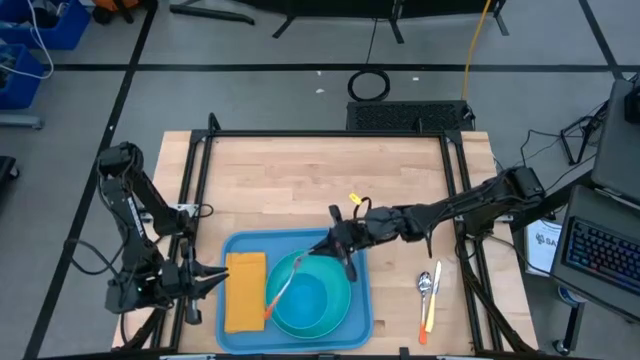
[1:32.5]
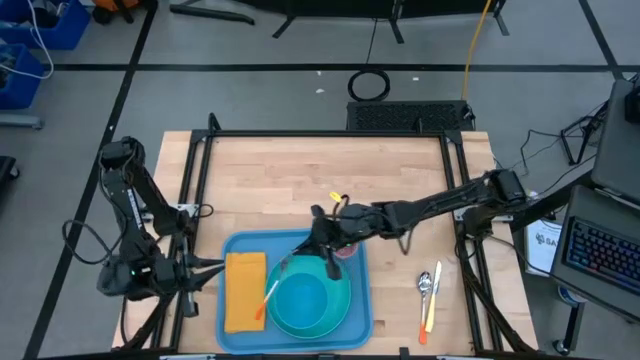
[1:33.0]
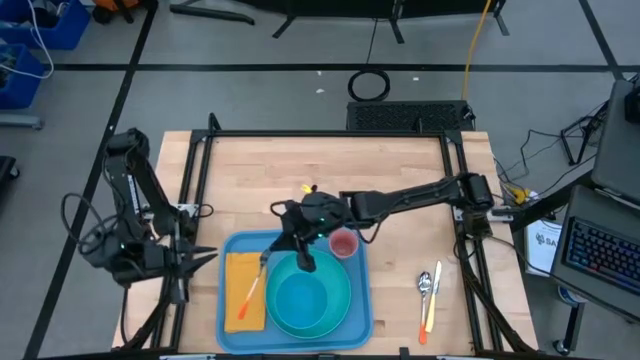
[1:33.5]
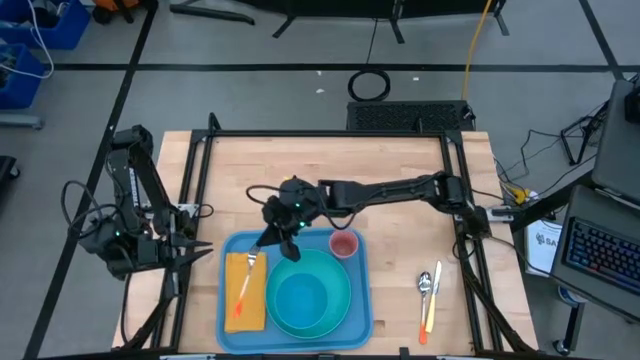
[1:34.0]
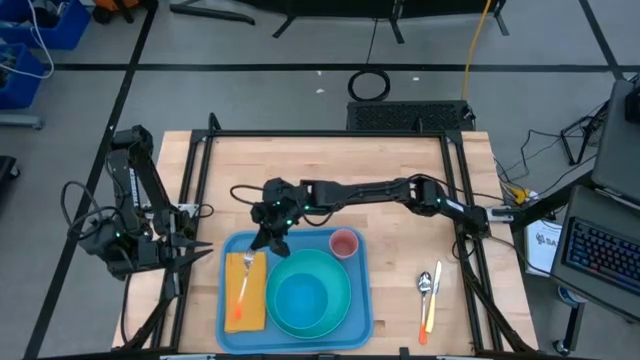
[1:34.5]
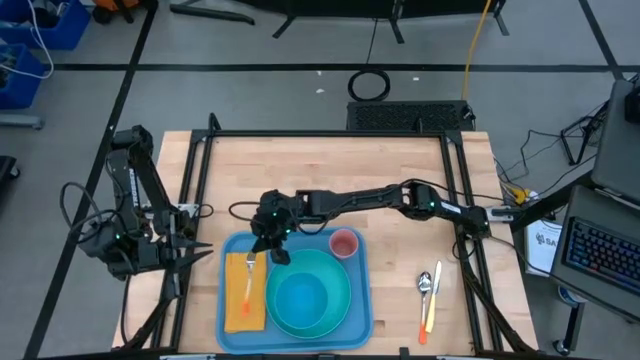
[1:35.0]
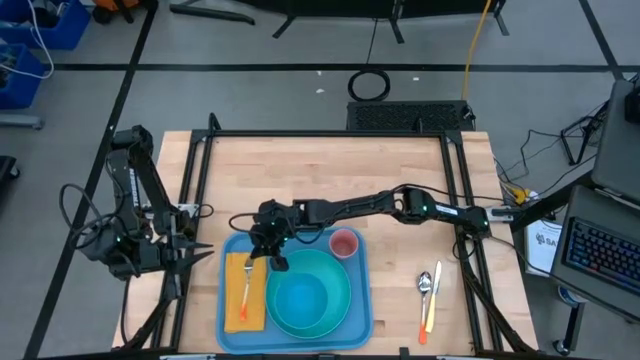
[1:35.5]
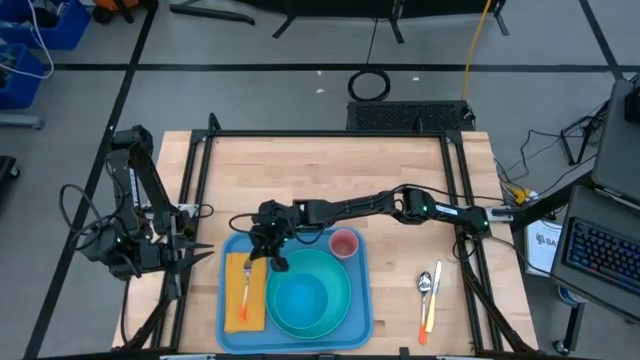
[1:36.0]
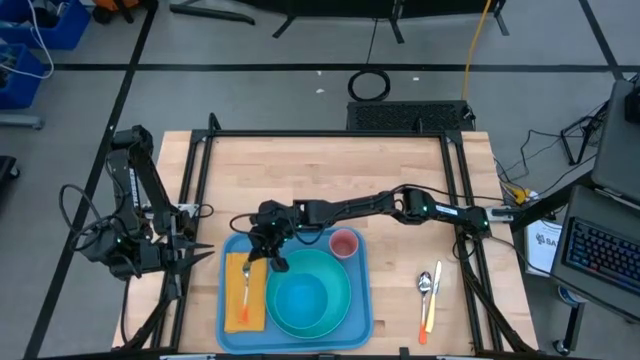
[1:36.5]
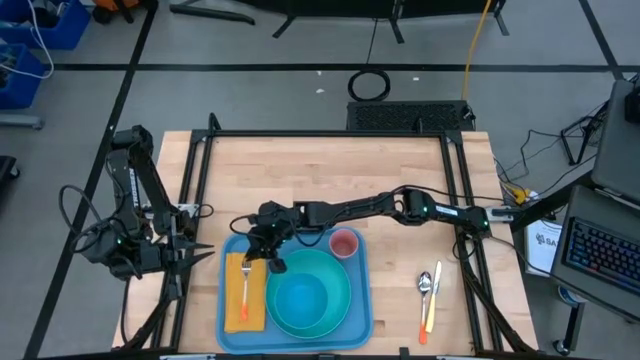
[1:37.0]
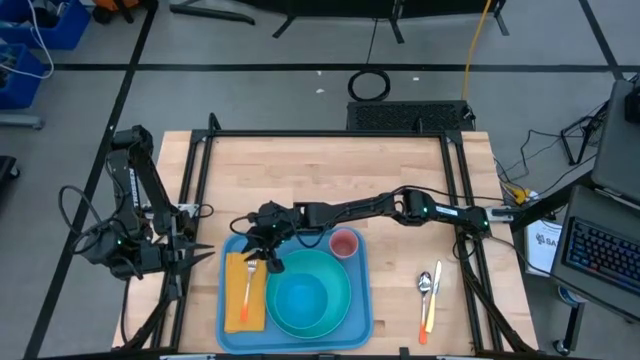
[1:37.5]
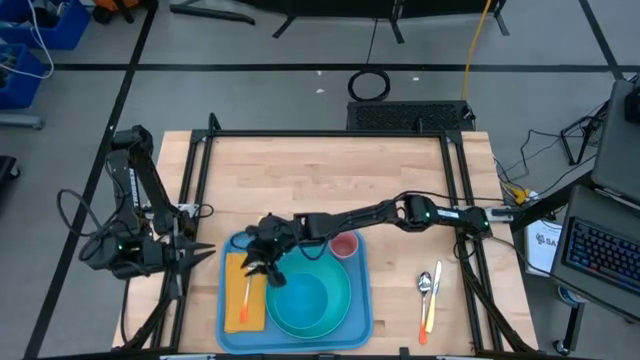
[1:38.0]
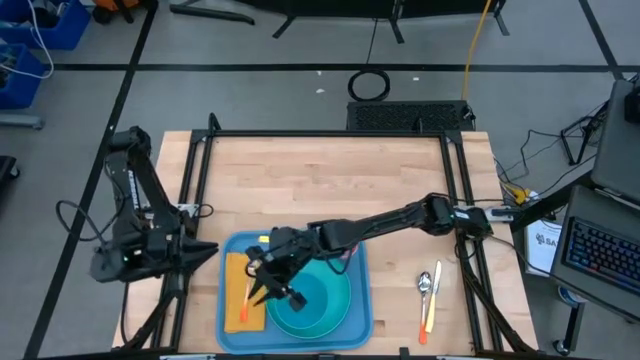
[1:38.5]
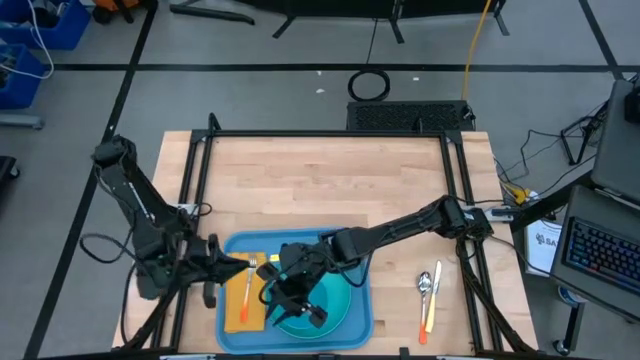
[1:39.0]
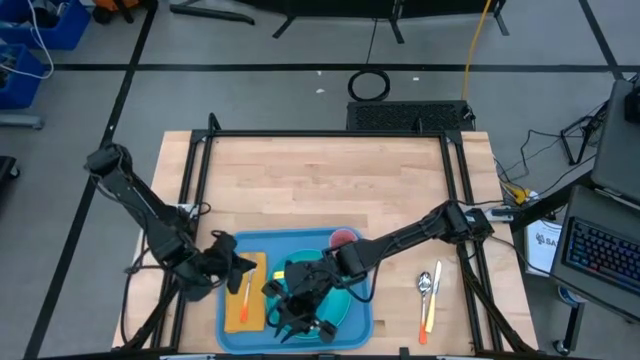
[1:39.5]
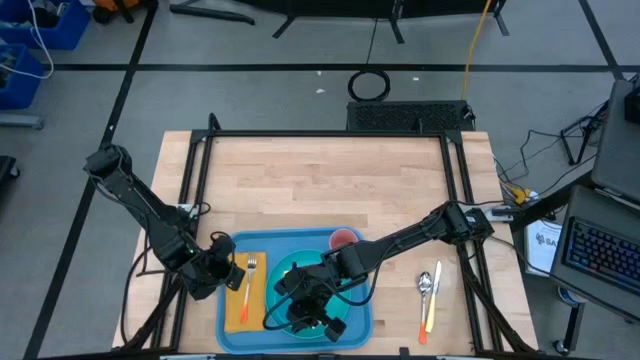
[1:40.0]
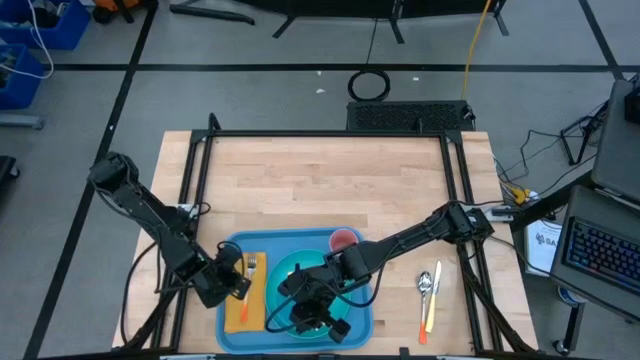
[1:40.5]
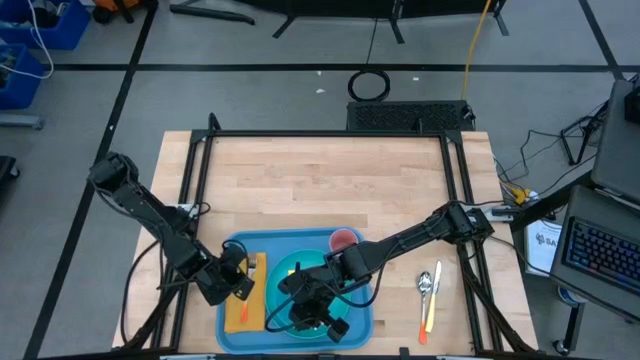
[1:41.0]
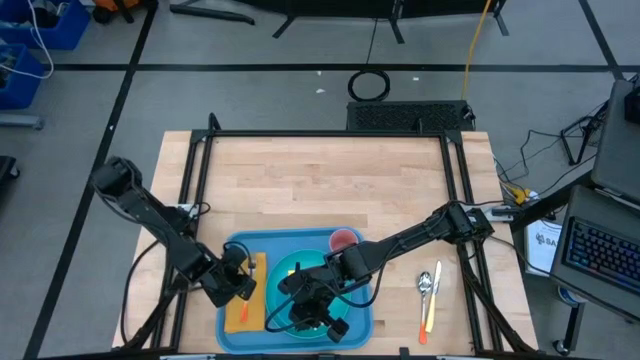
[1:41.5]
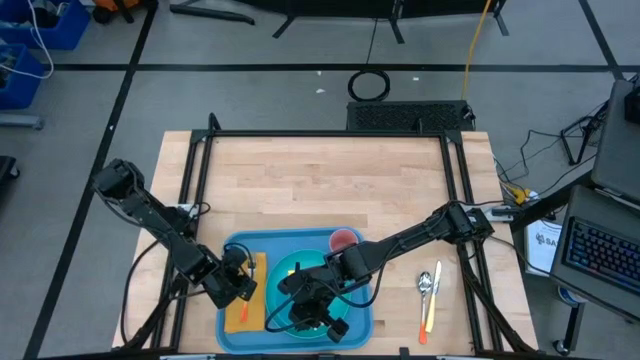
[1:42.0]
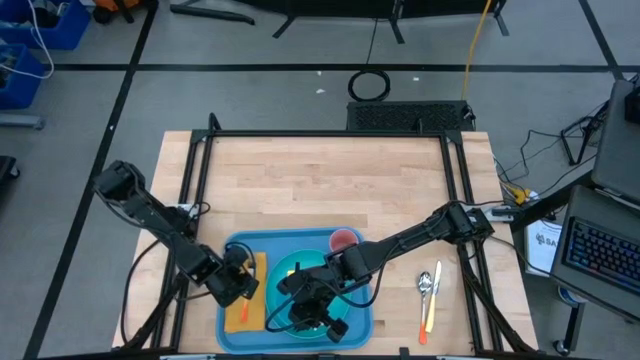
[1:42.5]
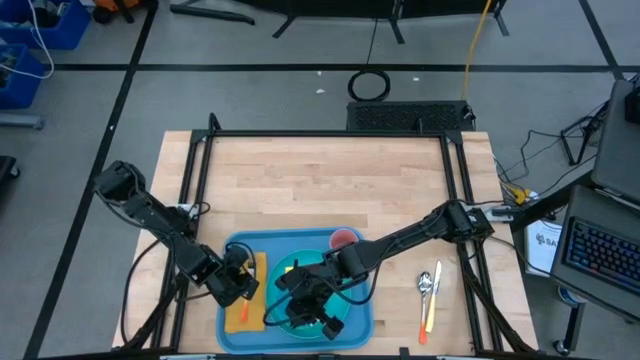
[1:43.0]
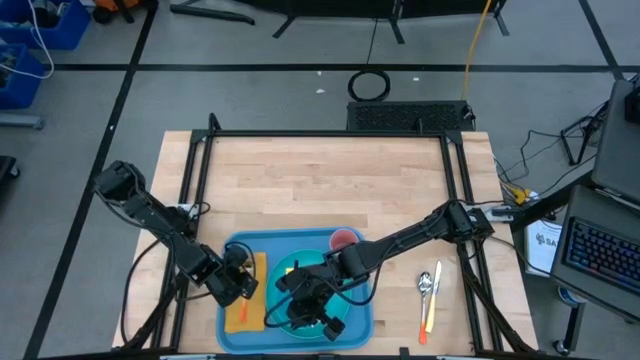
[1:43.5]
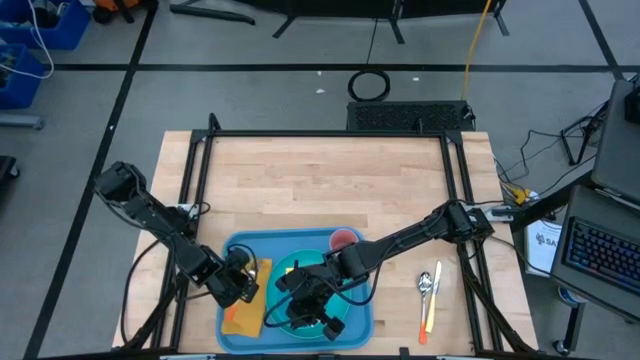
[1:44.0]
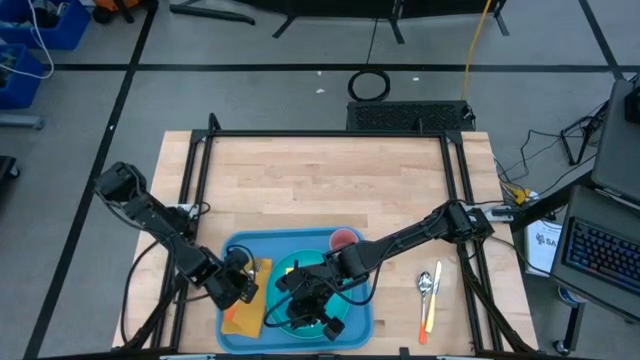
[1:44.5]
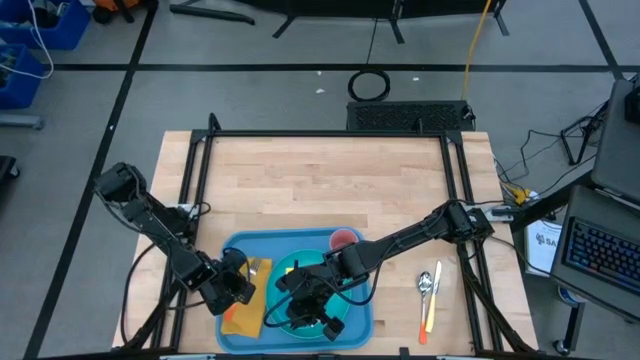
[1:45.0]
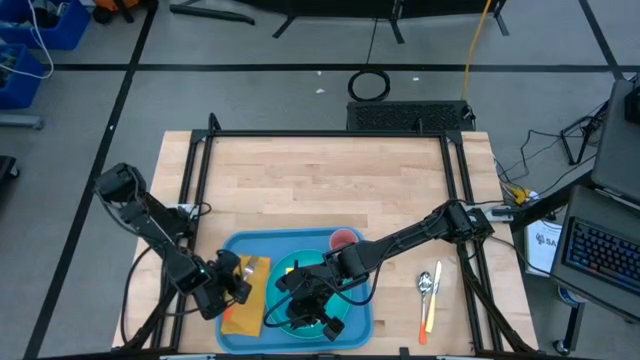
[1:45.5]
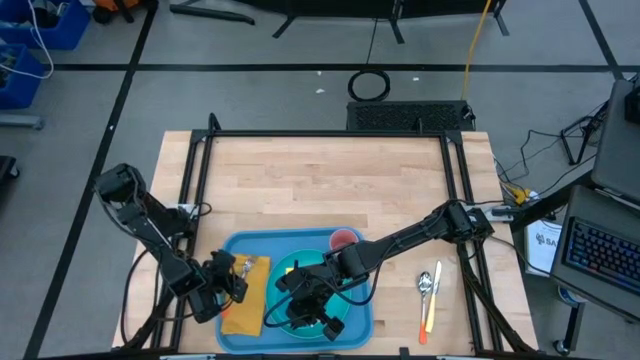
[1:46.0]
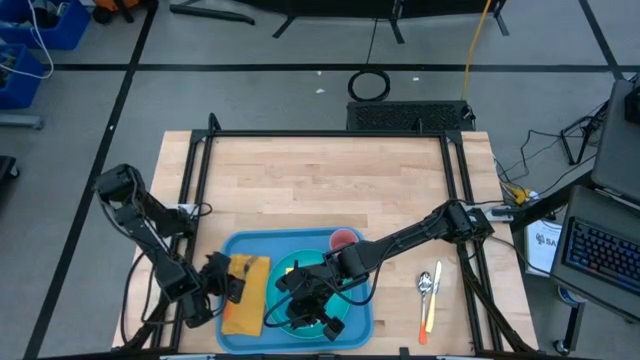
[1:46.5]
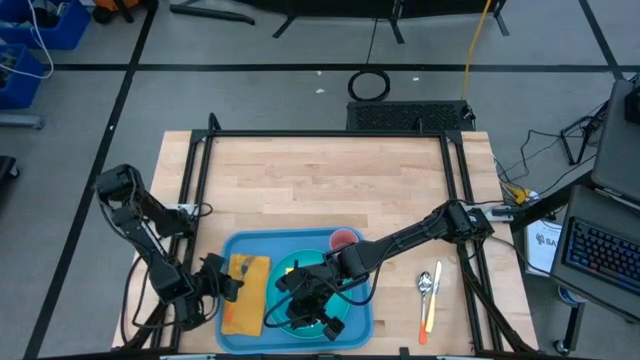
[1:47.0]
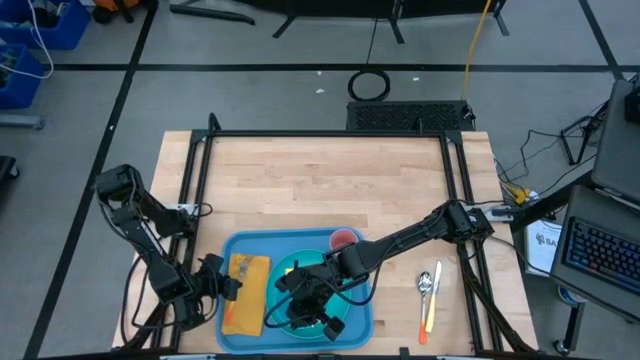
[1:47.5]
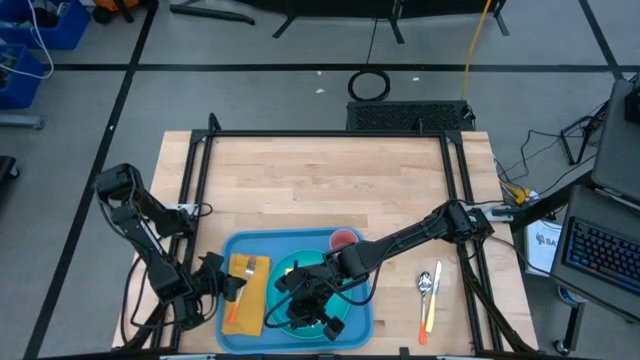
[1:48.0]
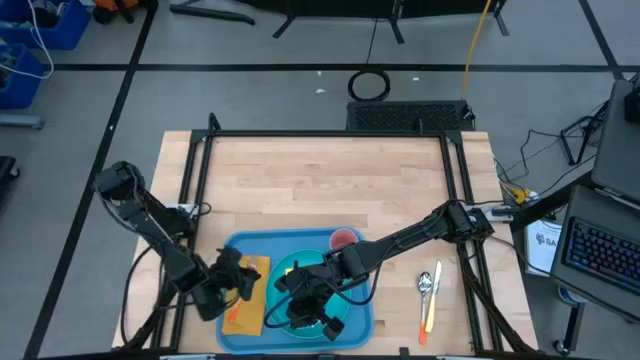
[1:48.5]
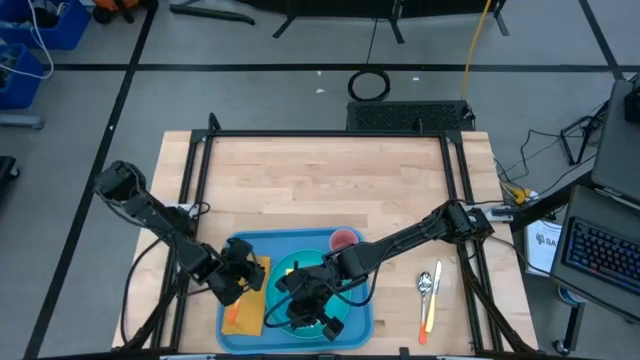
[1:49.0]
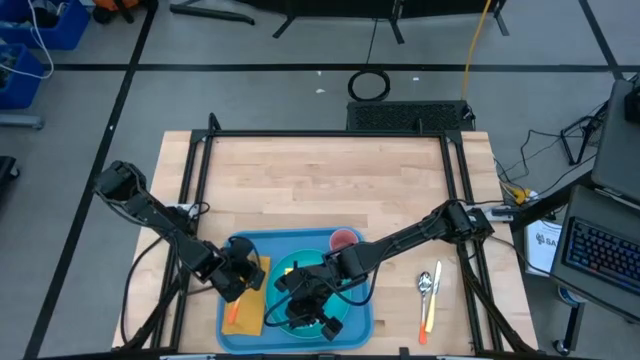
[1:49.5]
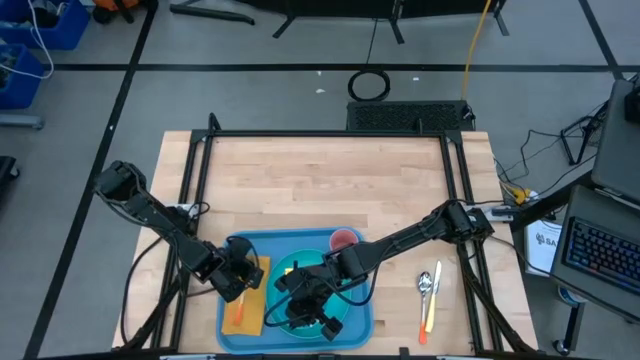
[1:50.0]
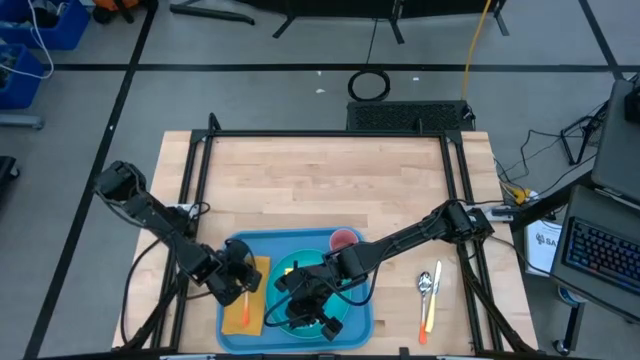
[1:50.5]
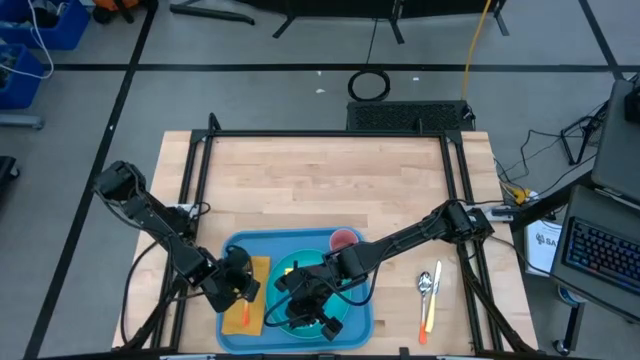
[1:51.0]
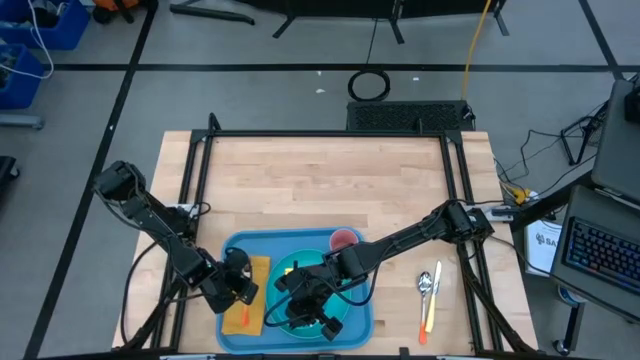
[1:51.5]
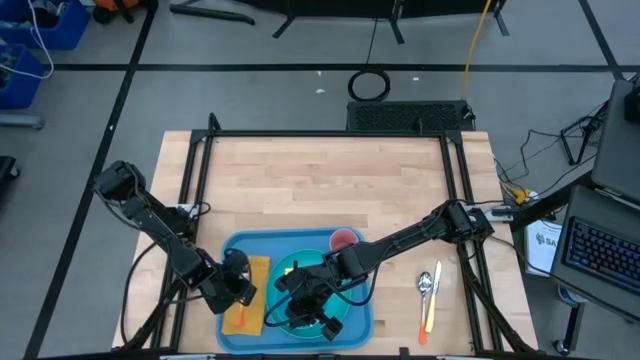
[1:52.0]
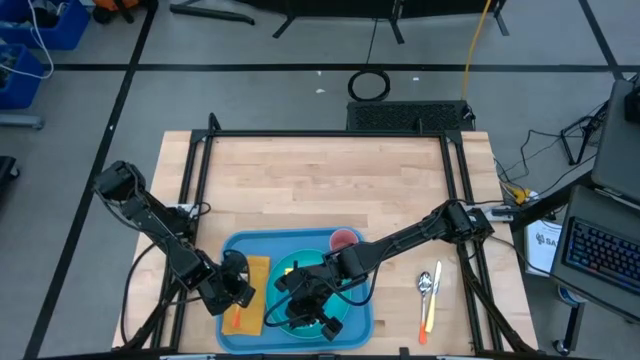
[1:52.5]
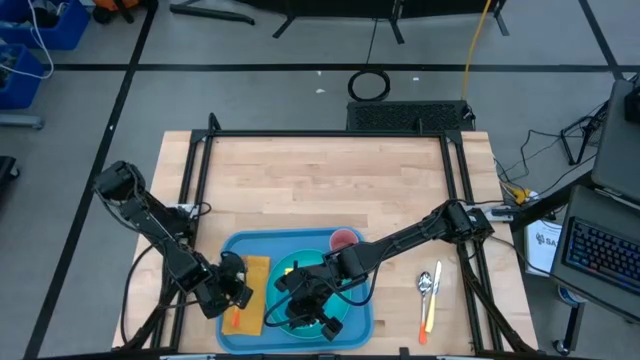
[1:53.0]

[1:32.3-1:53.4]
Task: Set up tray
Put the orange fork on the yellow table napkin
